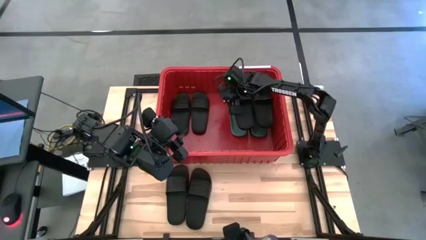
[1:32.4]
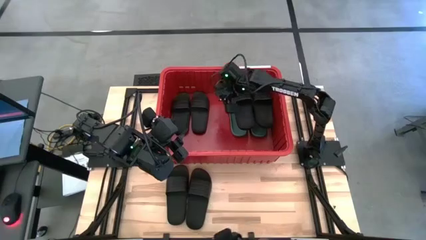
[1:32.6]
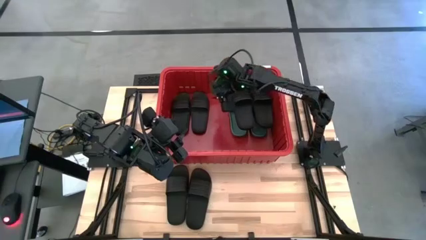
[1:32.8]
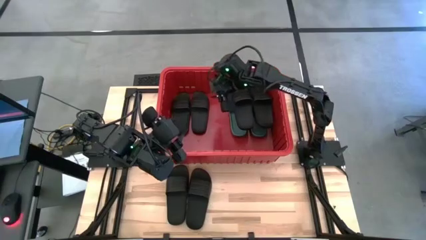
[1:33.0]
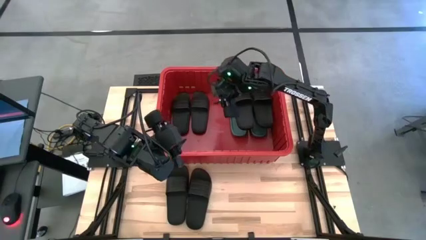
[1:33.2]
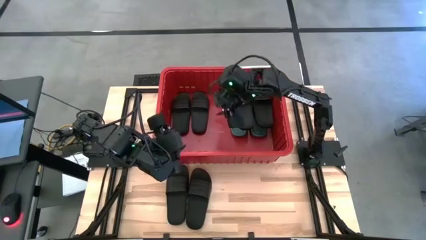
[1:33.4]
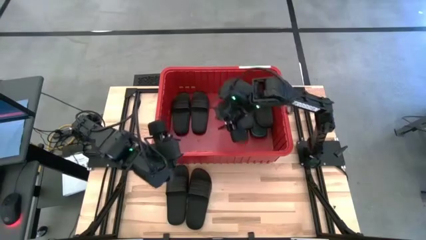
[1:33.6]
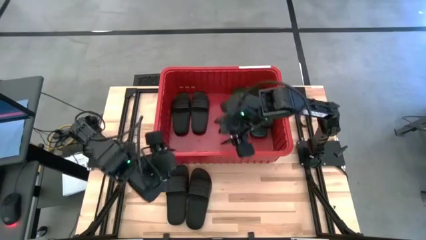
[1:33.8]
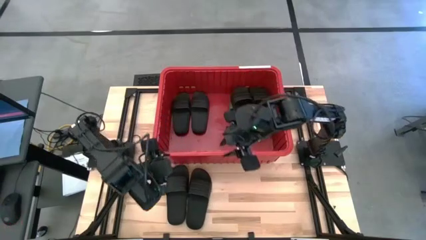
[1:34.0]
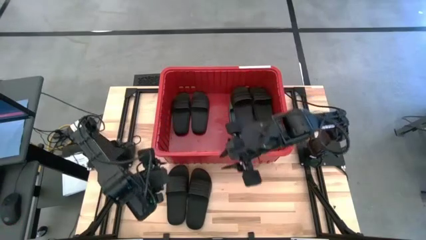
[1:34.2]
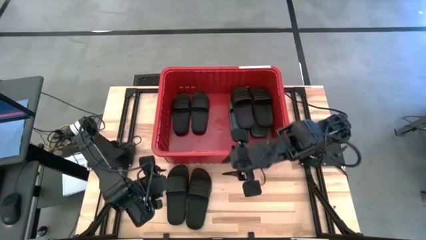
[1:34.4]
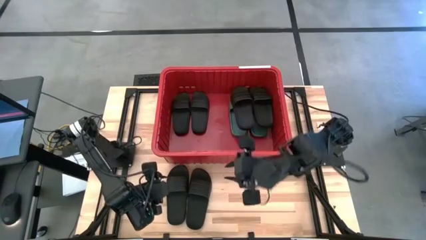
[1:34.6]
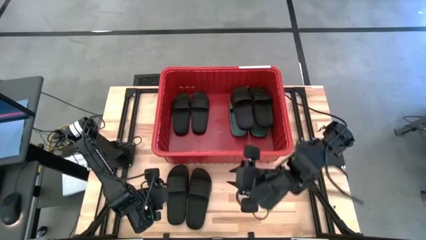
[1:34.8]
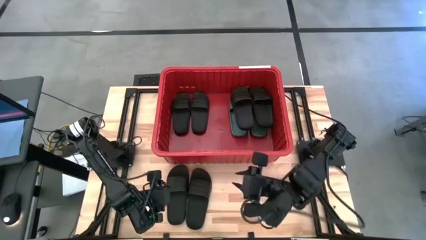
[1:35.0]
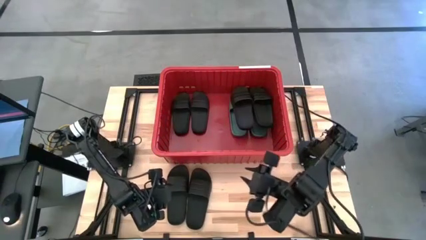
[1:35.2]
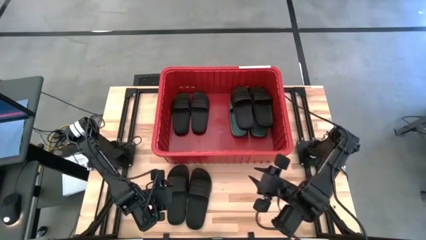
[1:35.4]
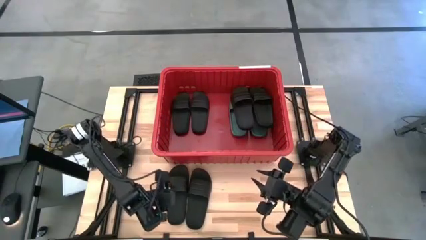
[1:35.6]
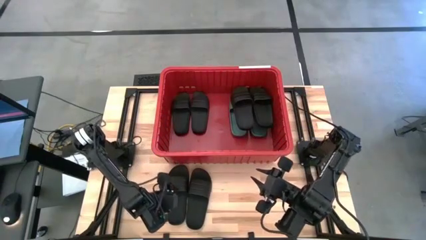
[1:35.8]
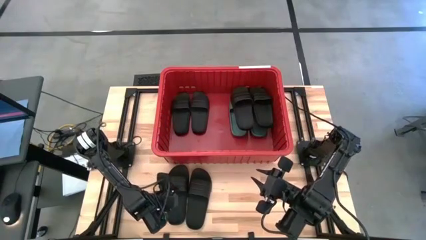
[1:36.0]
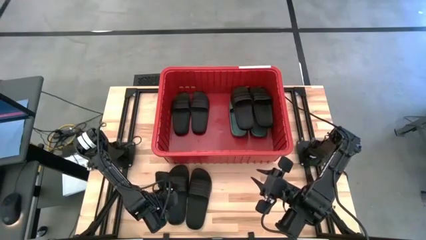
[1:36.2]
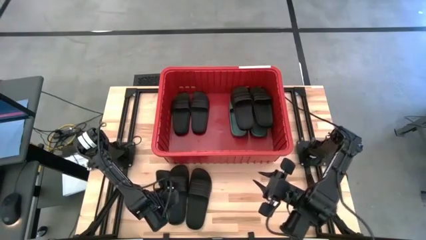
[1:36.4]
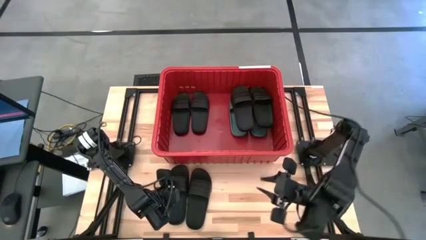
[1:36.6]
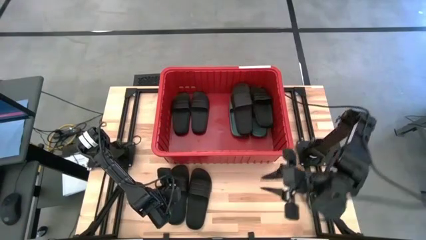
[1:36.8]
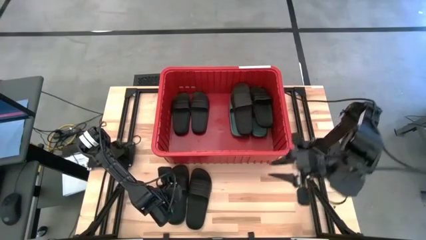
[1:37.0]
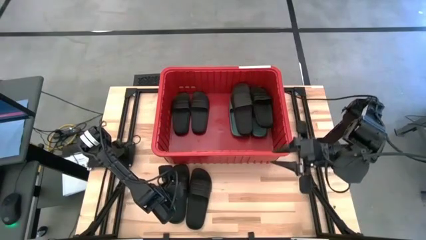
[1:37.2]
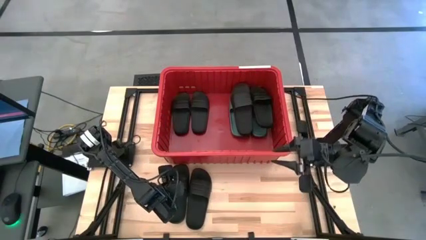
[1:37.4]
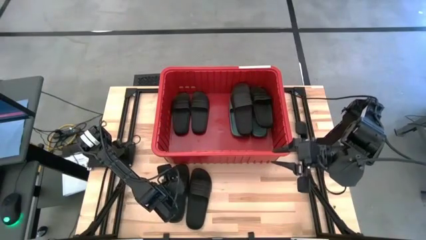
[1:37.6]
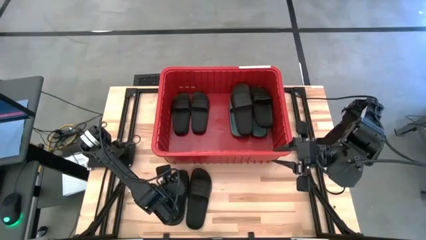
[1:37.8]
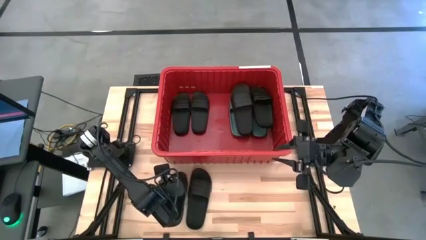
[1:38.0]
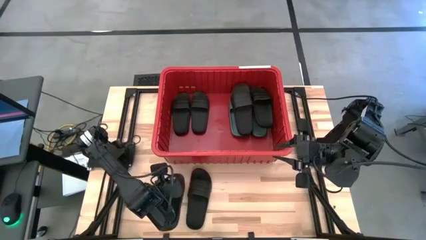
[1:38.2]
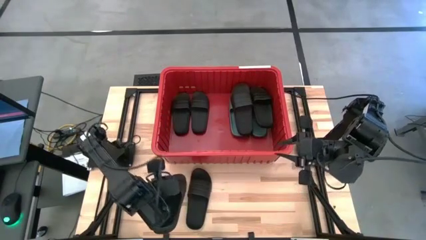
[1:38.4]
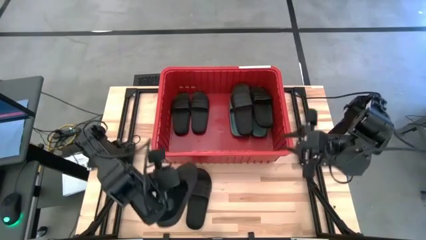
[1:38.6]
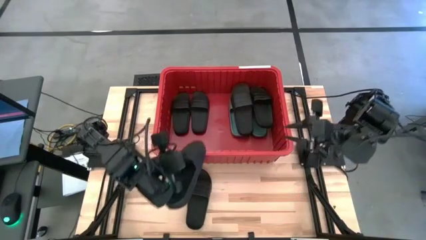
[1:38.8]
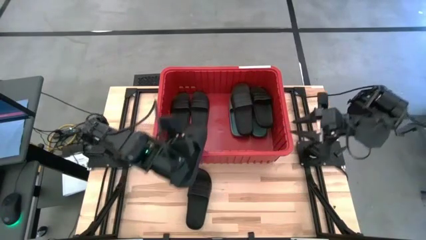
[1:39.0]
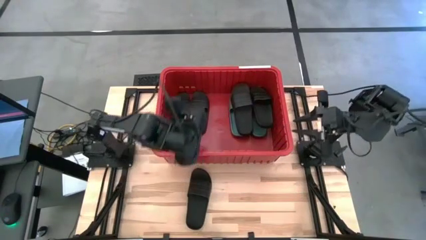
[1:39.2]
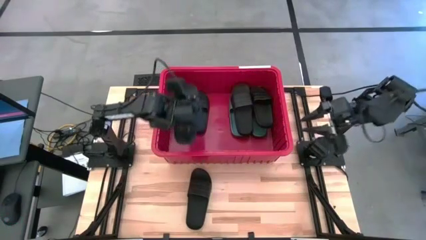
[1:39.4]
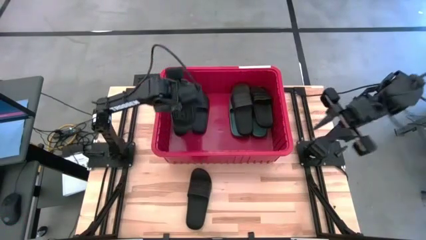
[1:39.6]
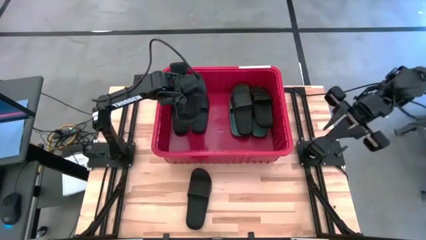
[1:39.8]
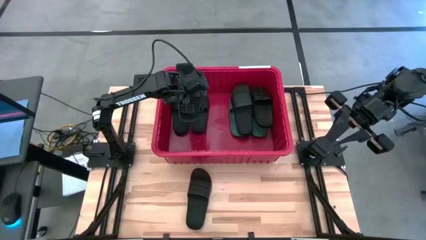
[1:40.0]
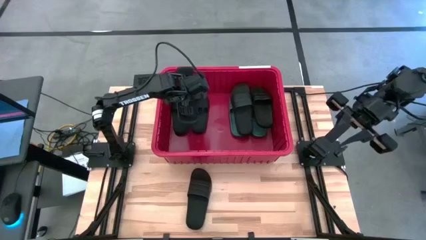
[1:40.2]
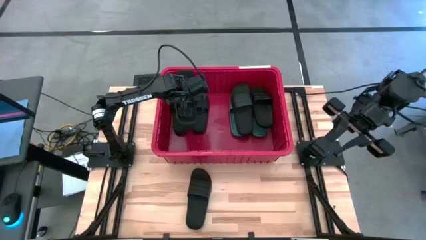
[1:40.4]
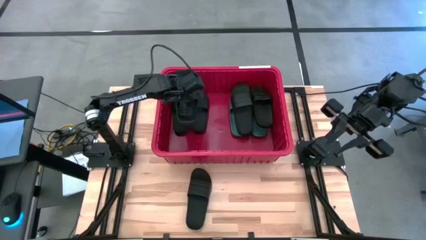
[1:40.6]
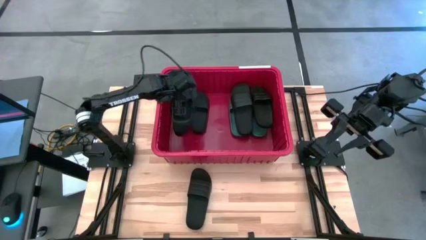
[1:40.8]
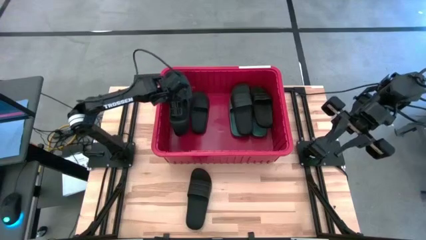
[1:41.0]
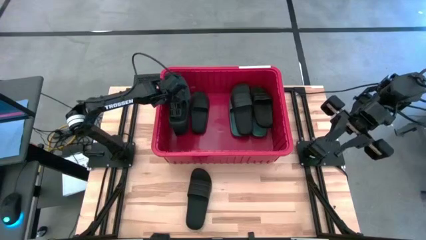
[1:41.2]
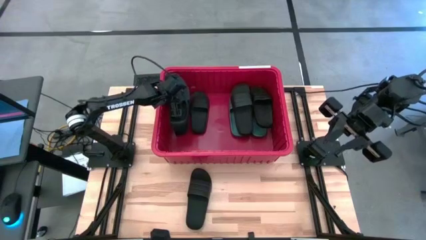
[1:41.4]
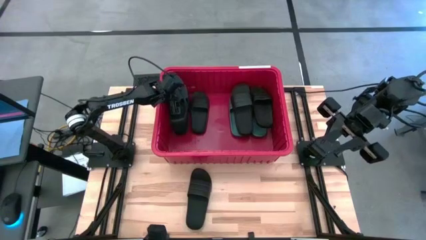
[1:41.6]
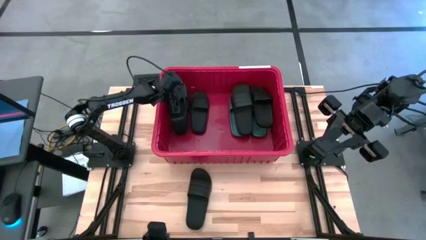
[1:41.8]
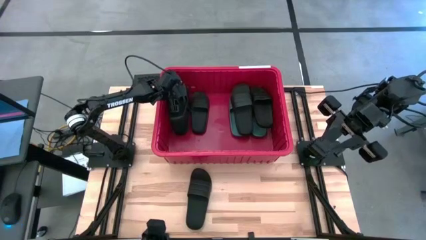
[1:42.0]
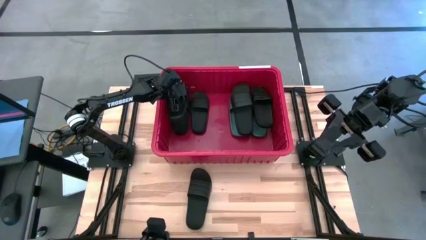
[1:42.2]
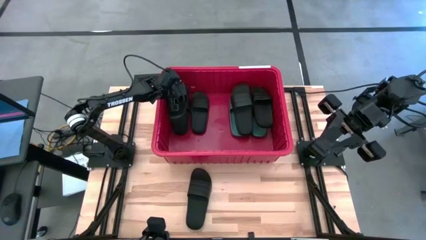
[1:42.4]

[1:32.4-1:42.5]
Task: Pick and place slides into bin
Put the left black slipper into the red organizer bin

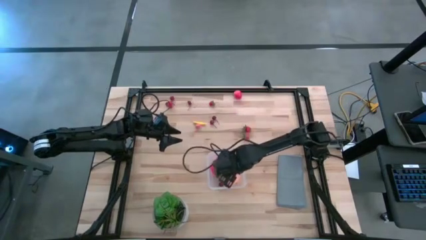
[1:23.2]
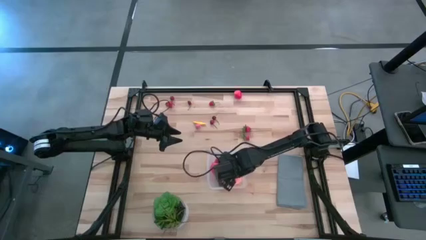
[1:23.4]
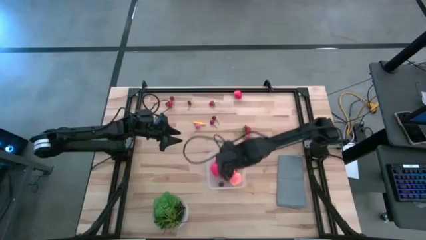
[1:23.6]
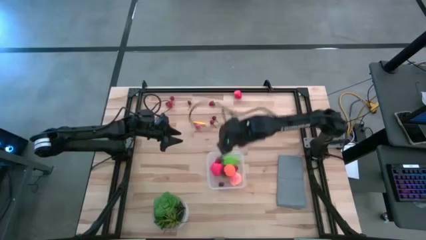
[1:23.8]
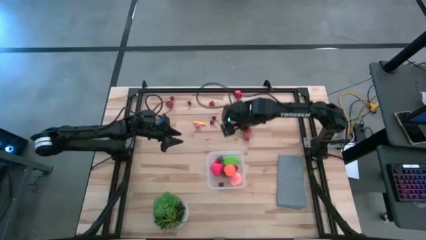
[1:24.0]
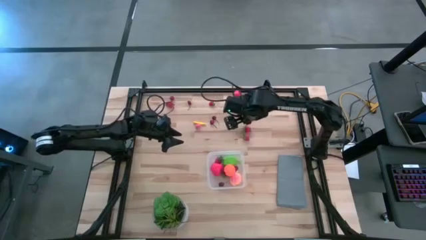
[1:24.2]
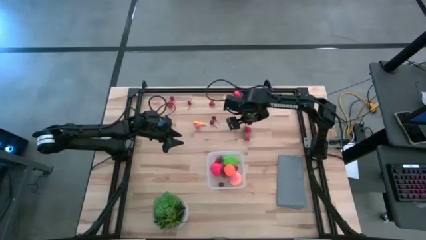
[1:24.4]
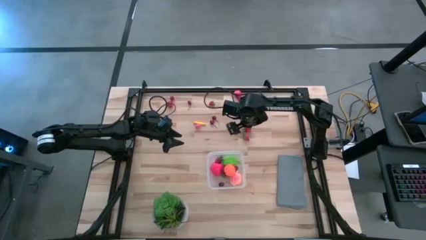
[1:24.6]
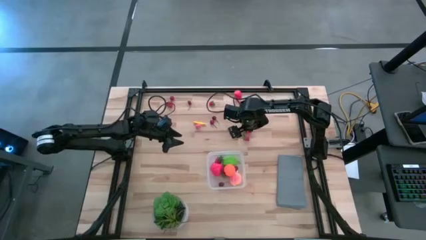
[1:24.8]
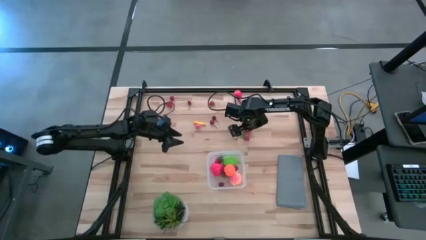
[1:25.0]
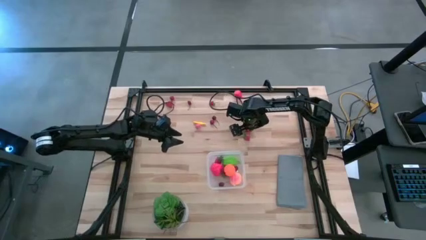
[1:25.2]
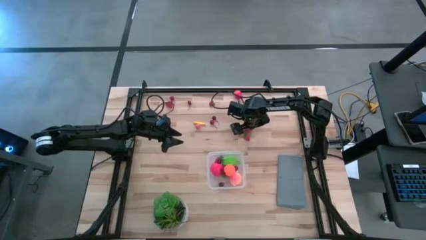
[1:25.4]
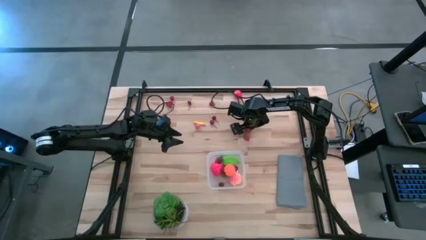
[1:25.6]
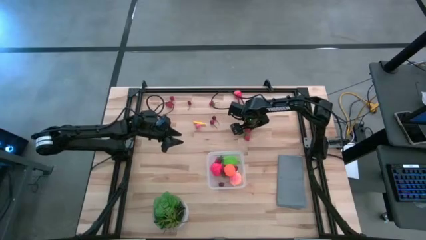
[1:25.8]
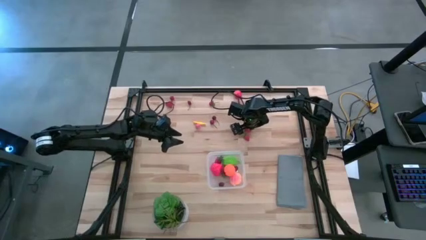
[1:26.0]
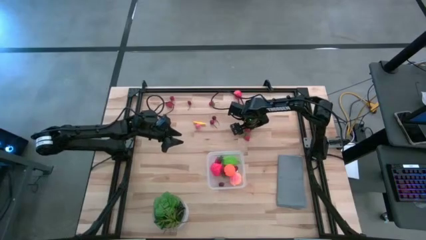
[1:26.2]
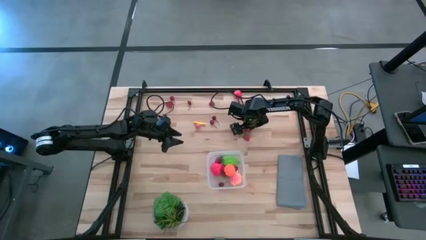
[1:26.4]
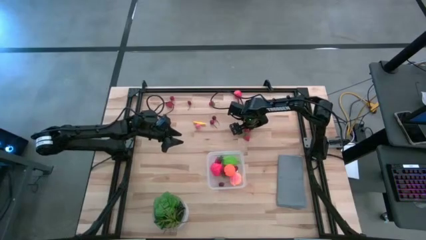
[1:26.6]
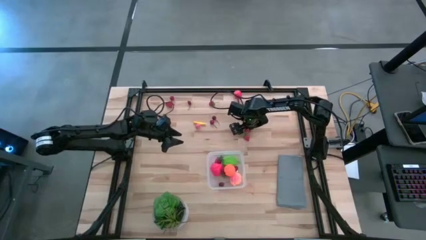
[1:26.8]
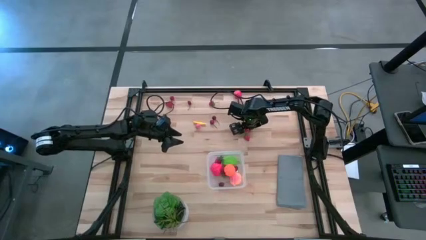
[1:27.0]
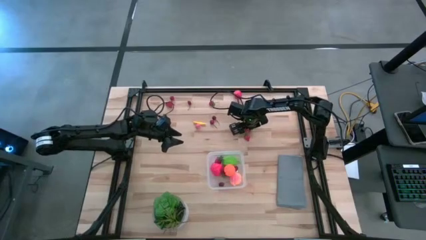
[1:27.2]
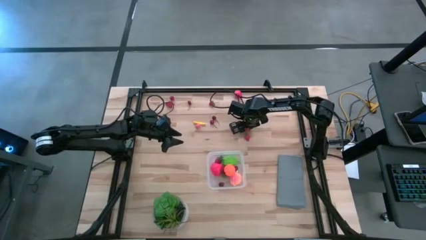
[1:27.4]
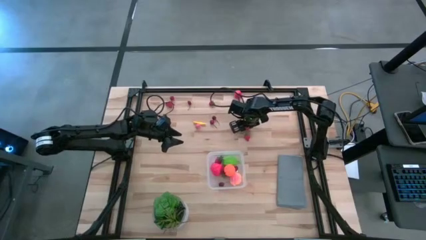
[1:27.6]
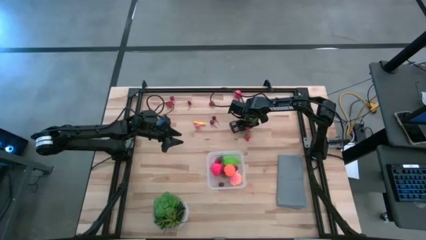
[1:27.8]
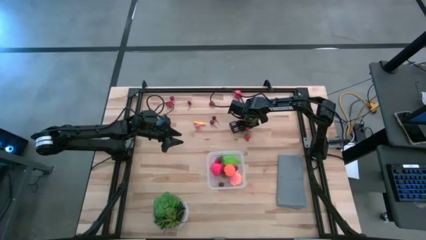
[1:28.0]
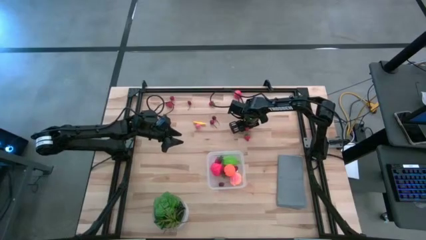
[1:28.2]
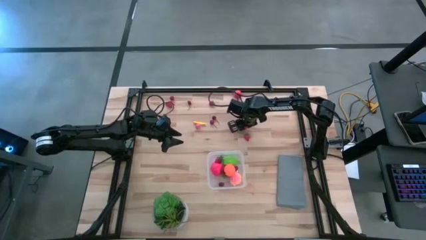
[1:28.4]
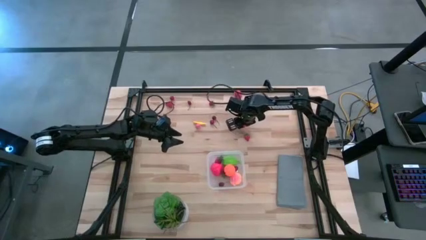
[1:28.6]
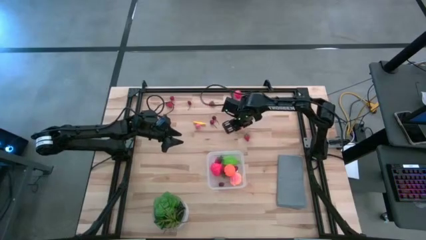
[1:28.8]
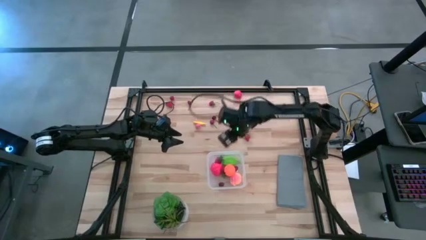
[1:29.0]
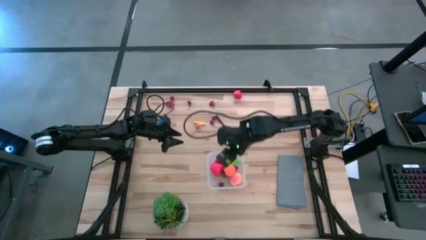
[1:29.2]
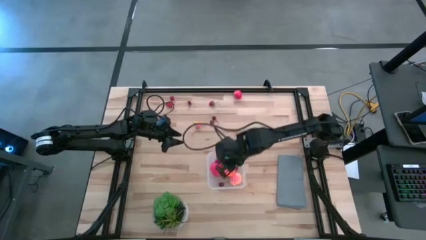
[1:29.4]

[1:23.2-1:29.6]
Task: Pick and placing Produce into tupperware
Put the red strawberry into the transparent bin

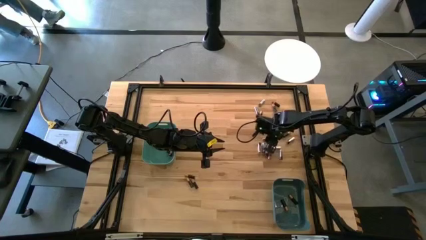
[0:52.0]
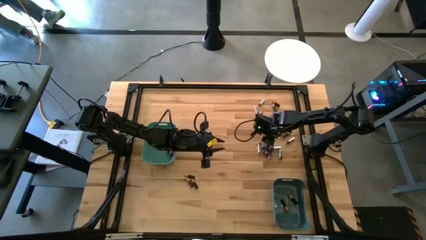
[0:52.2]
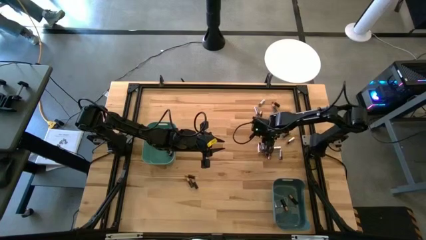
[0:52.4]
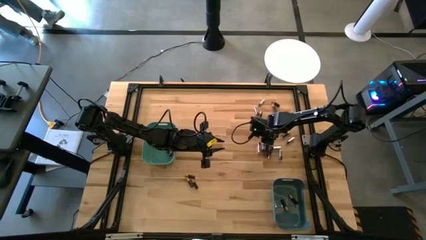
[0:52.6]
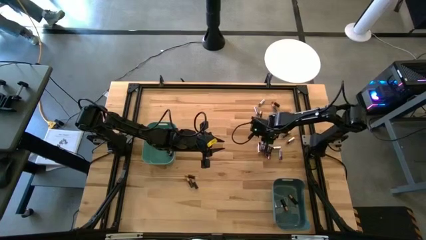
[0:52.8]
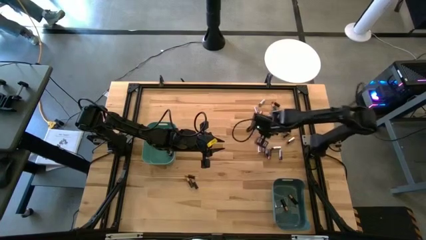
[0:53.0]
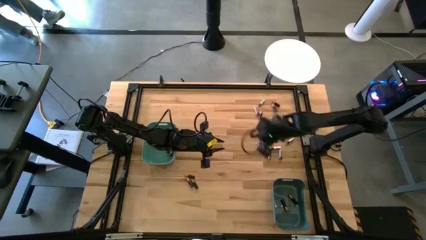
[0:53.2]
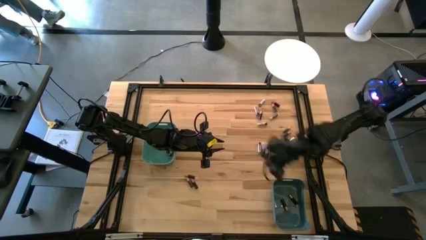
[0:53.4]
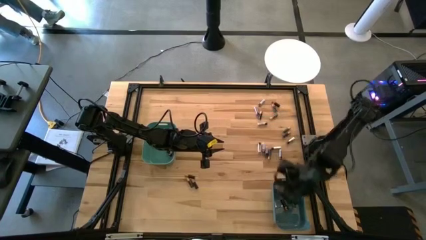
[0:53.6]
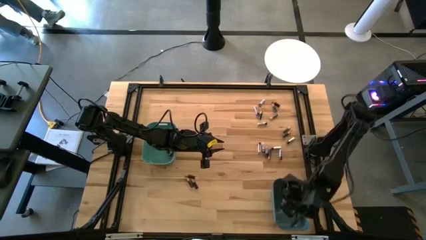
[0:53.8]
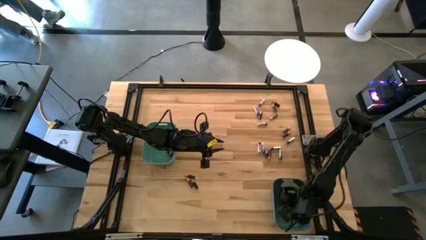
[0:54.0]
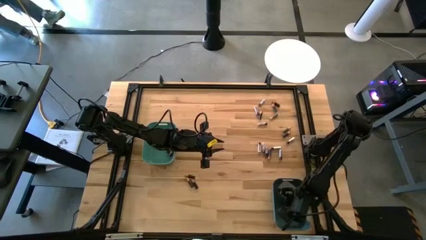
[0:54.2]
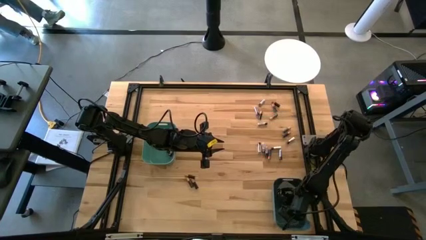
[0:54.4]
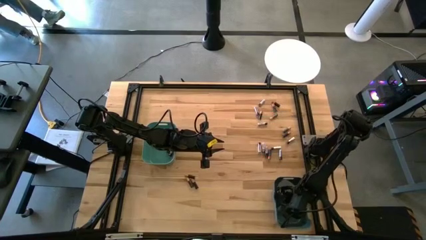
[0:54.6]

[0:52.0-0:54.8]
Task: Sort batteries
Put the black battery into the blue bin
